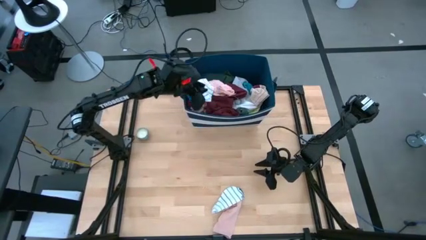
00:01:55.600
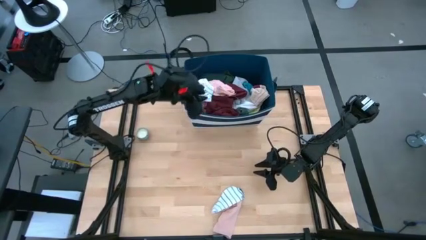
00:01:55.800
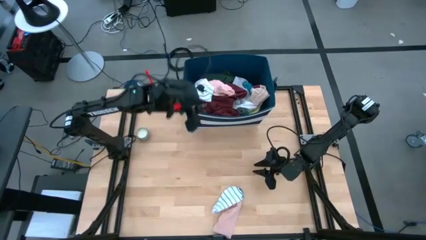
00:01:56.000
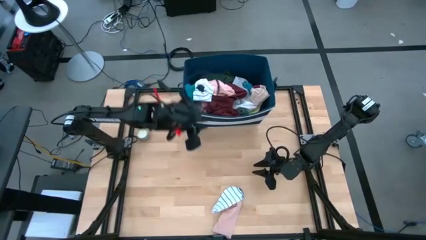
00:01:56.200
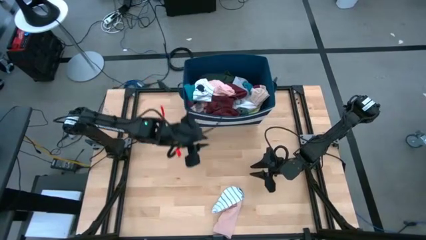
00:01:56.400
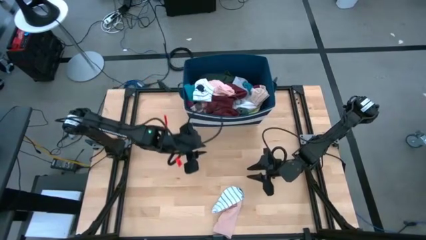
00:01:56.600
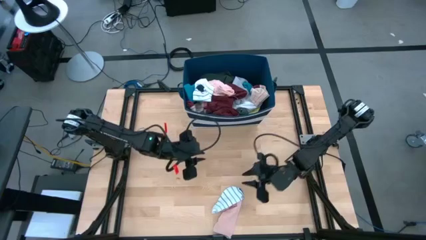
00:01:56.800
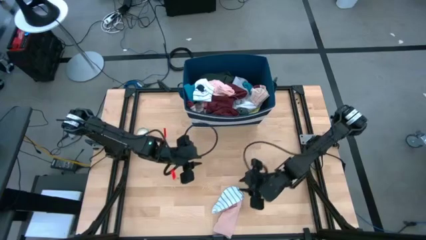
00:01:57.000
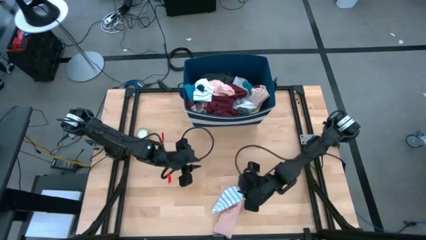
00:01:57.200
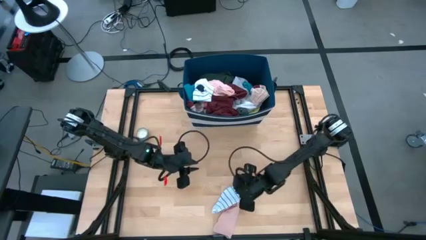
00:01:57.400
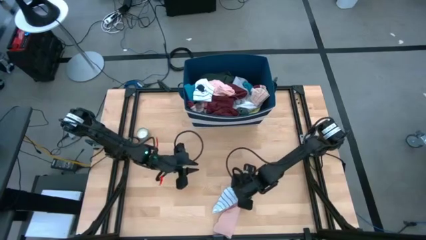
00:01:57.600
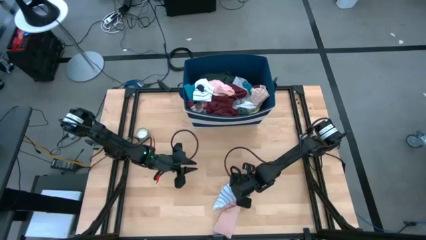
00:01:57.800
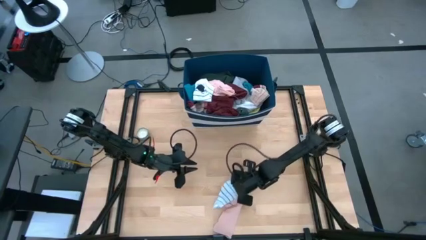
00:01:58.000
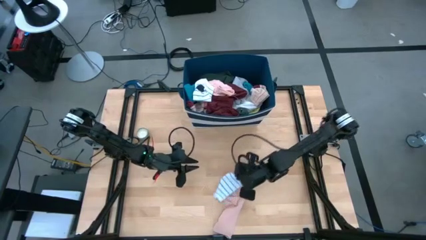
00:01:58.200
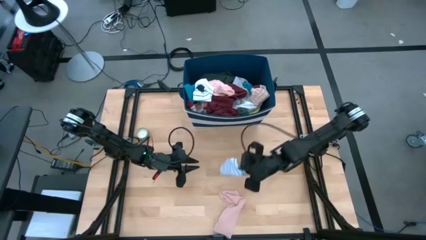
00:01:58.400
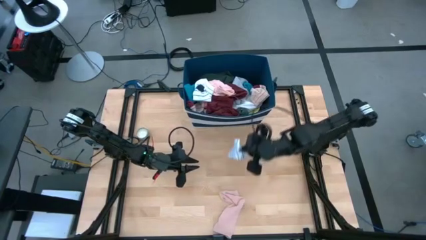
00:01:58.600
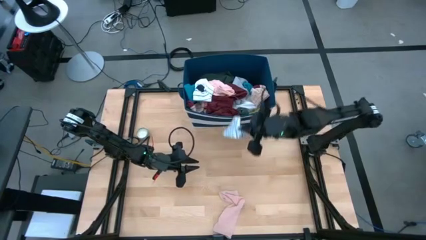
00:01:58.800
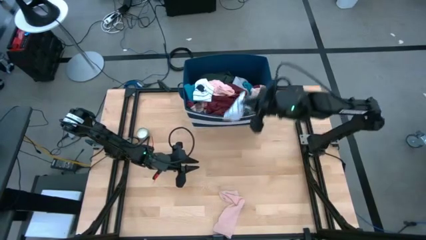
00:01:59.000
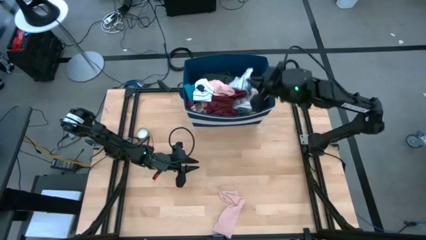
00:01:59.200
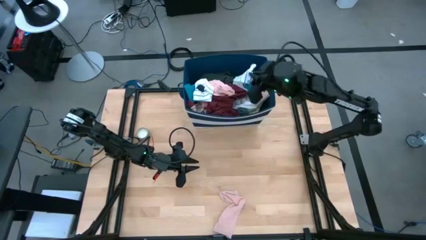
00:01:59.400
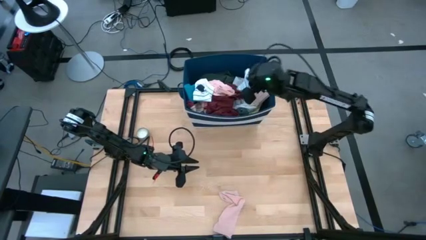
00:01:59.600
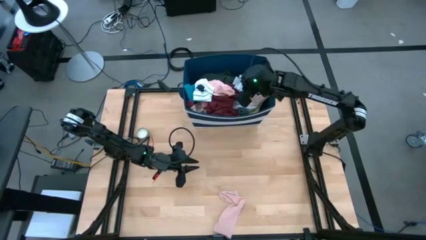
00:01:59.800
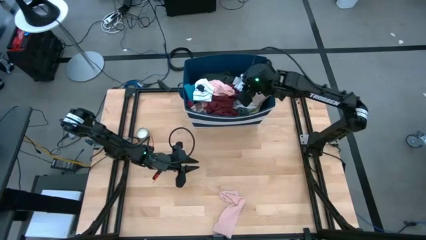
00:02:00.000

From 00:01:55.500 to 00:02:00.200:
Task: Sort clothes
Put the white sock into the blue laundry bin

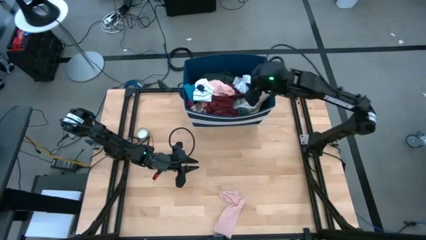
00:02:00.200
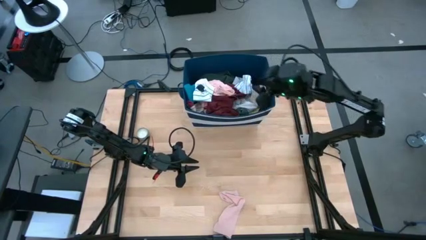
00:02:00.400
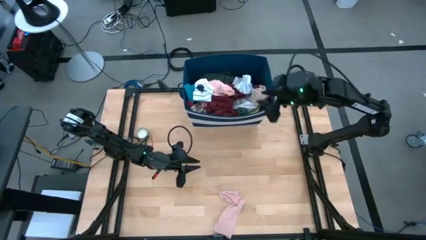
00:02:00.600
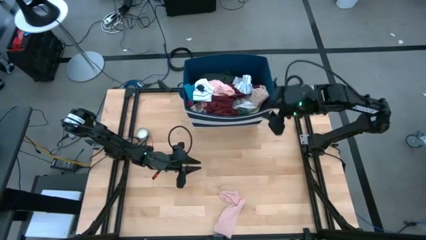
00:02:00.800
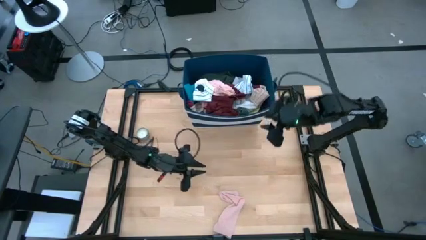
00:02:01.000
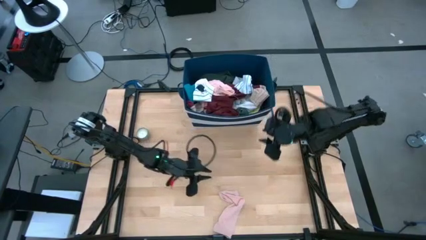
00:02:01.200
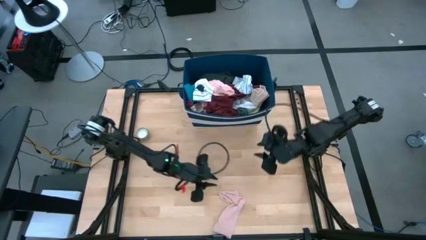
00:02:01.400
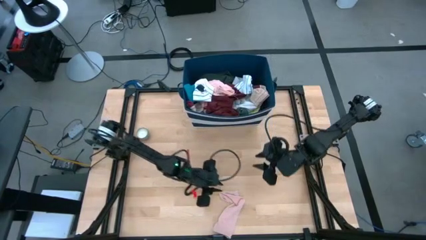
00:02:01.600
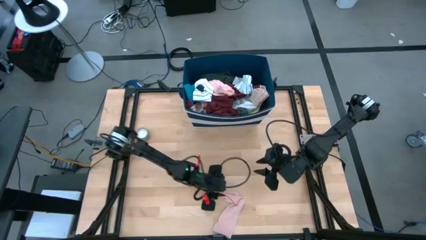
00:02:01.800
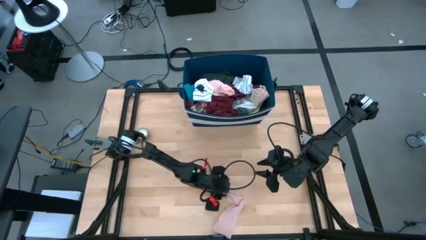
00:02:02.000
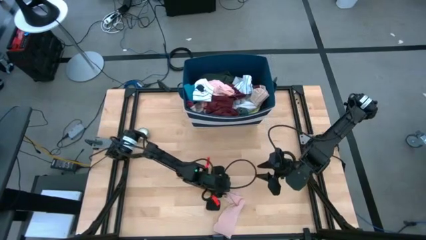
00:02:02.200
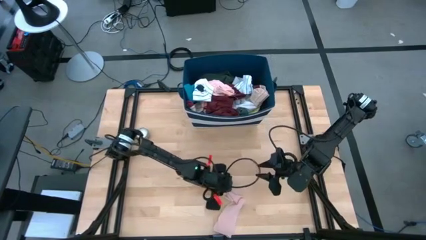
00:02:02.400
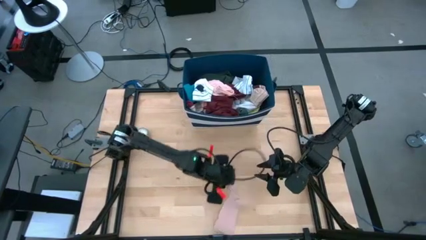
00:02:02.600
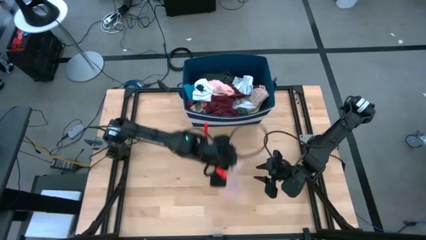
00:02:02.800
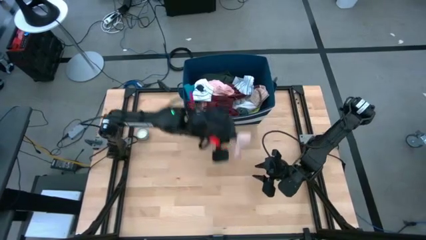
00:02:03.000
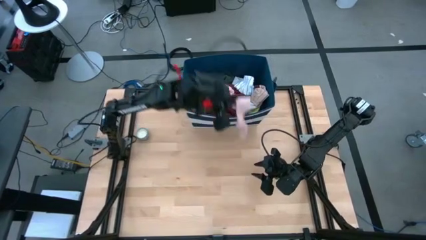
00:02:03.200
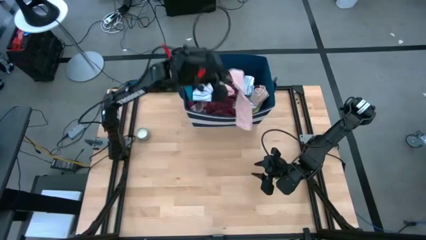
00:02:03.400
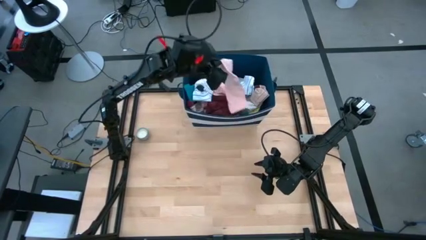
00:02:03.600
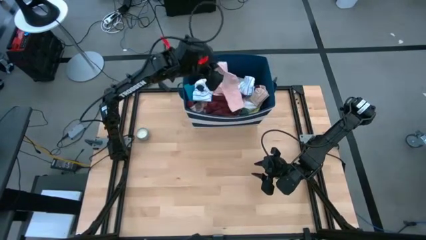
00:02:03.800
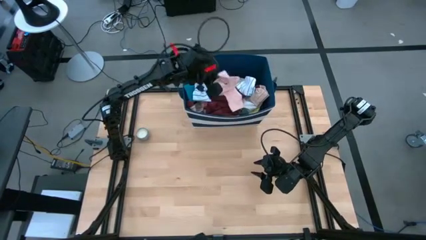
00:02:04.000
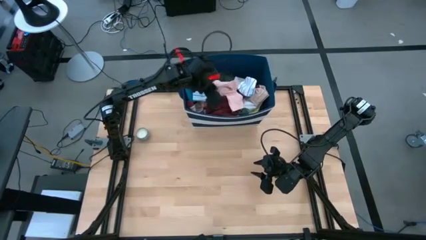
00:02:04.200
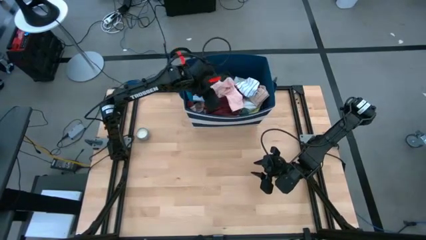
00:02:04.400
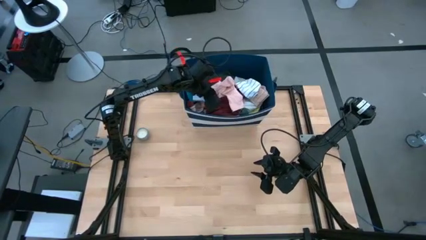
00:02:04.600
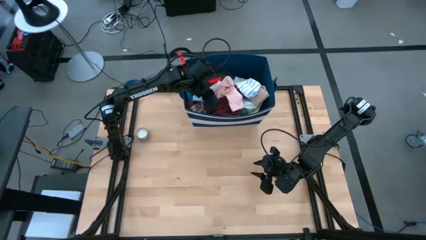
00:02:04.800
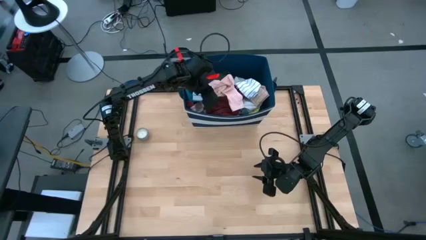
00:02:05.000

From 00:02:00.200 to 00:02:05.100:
Put the pink sock into the blue laundry bin

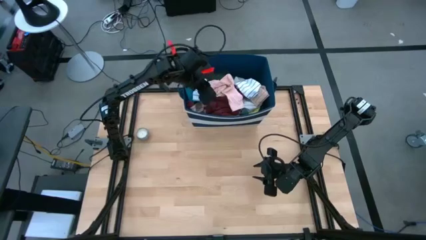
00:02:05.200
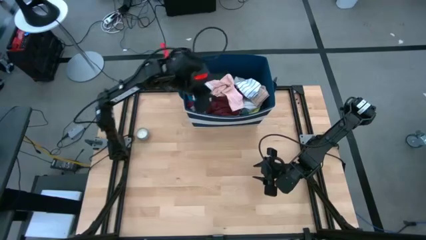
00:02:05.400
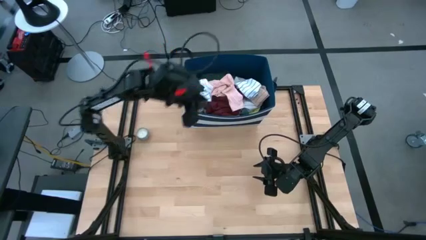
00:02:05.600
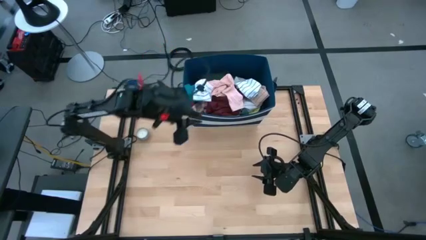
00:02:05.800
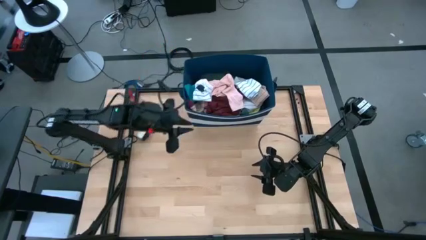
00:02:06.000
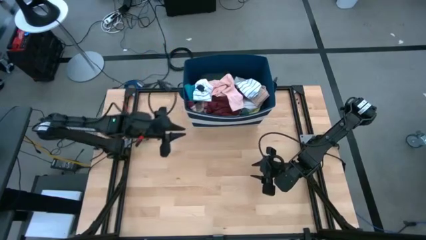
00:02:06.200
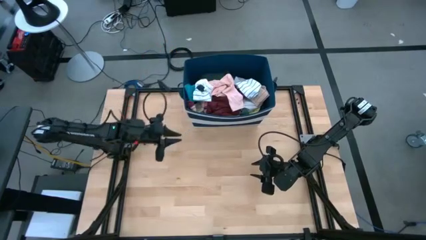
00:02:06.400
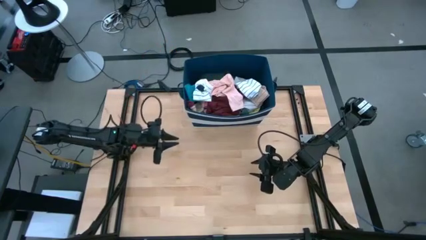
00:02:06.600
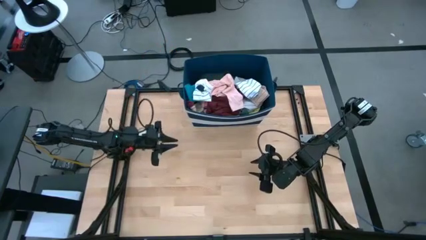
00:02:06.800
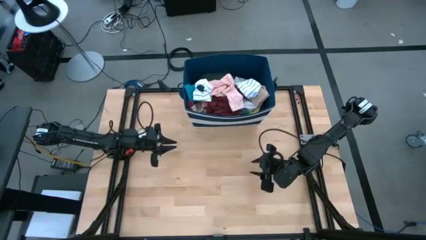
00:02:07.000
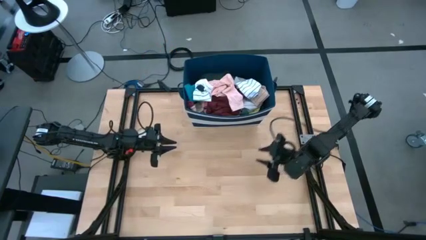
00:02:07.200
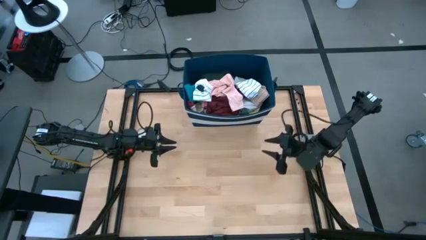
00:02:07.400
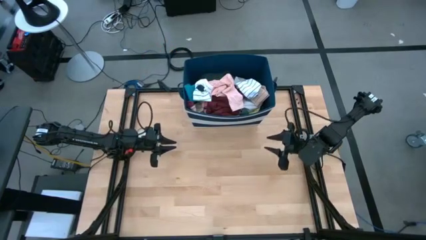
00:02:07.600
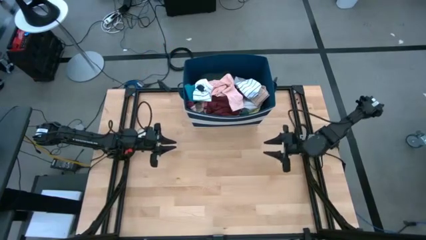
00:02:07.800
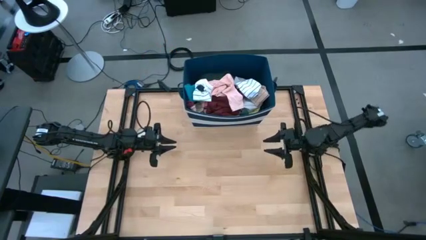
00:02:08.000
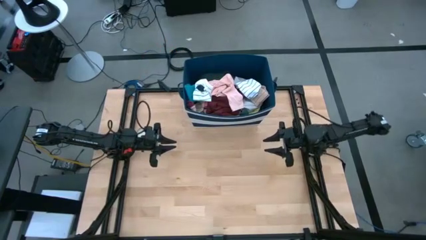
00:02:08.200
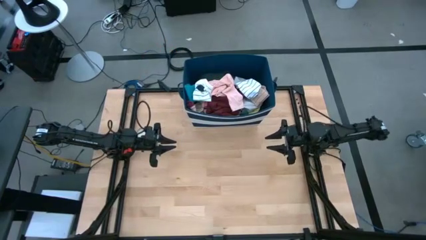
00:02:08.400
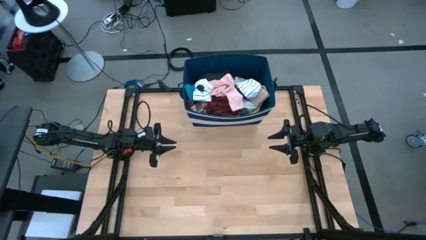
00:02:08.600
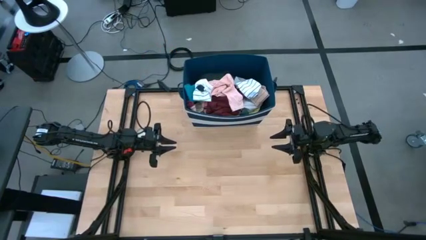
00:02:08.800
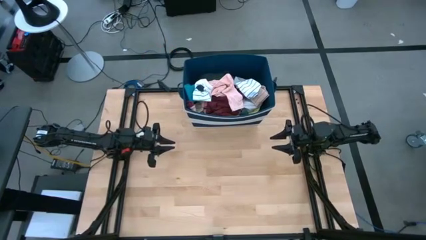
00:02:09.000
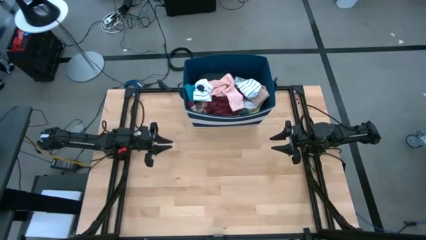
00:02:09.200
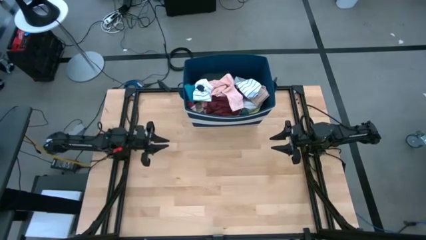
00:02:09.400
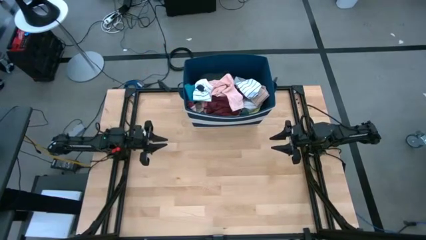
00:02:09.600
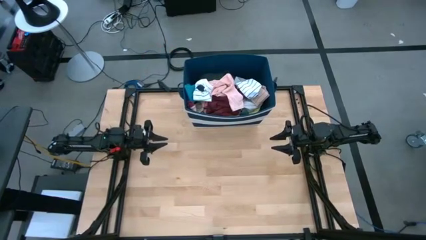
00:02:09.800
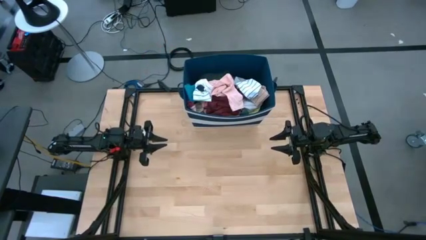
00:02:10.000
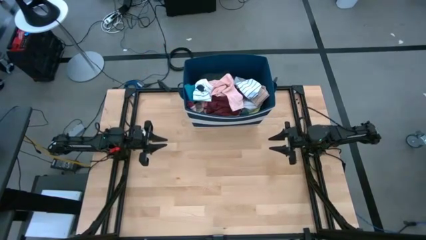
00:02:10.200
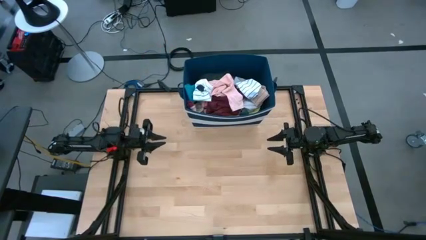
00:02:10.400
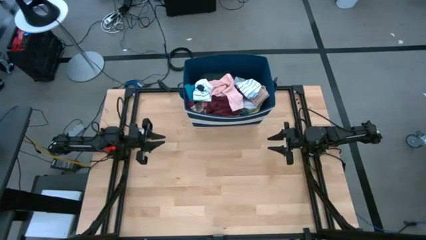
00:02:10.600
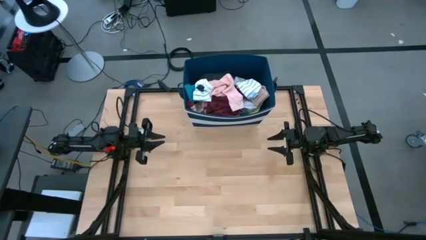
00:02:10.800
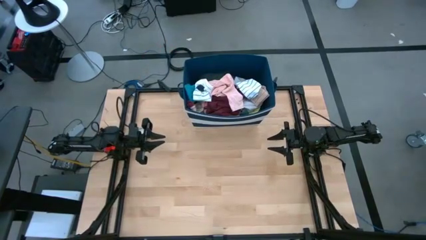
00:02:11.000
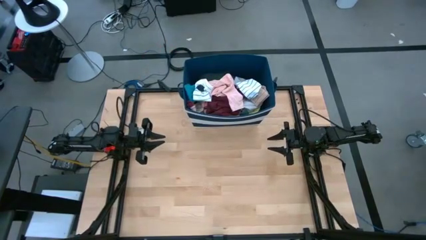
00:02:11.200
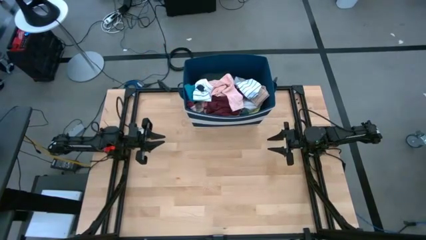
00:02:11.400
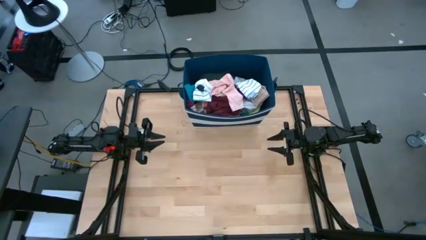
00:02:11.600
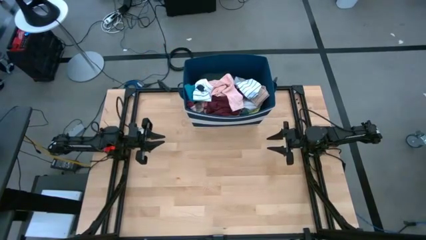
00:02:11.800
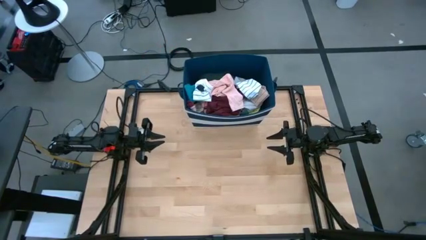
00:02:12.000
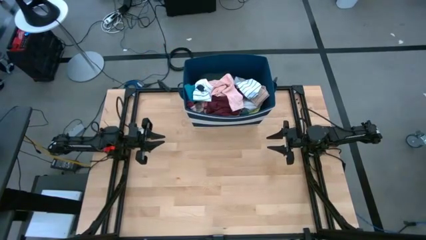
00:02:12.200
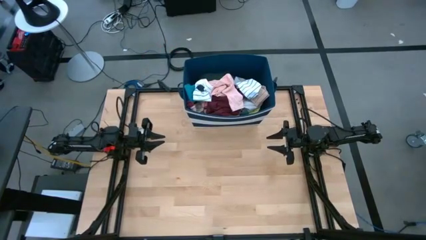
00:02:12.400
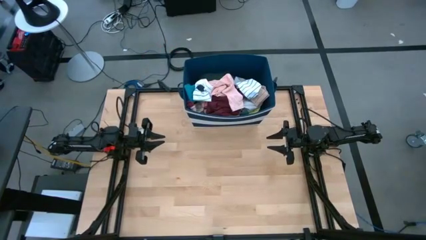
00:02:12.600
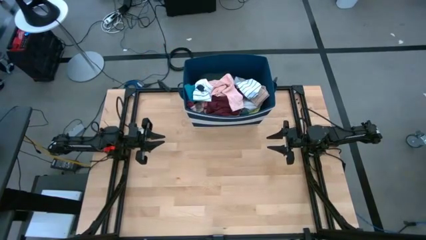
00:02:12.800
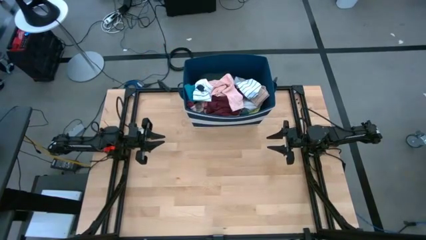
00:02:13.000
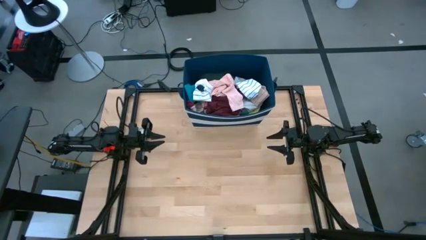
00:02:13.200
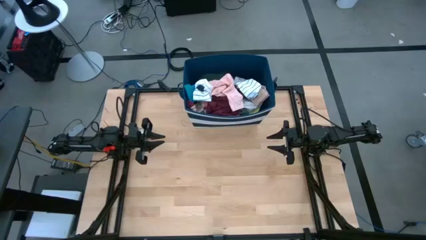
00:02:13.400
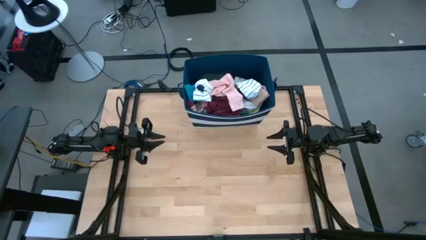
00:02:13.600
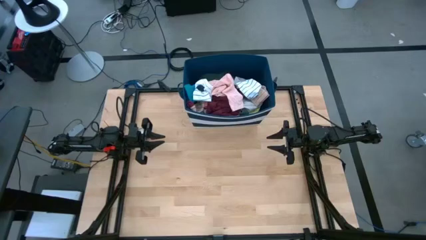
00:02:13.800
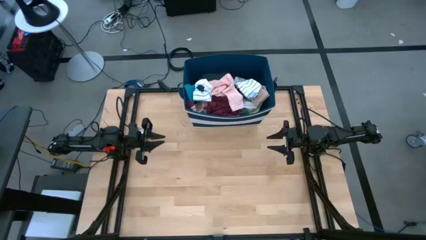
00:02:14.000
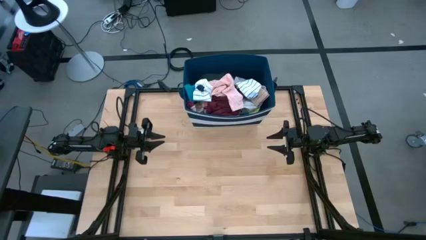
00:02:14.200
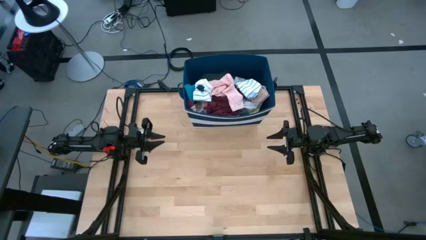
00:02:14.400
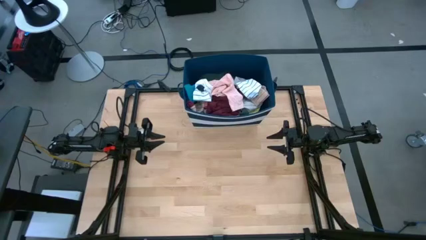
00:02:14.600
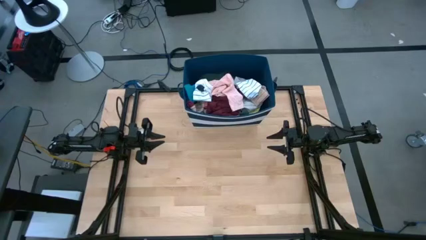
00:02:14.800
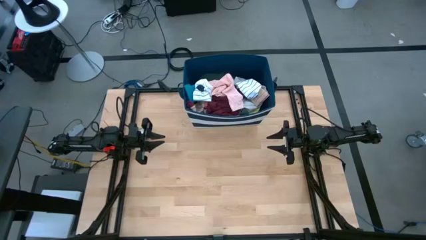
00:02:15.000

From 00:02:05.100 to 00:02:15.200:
Return to Home Position
